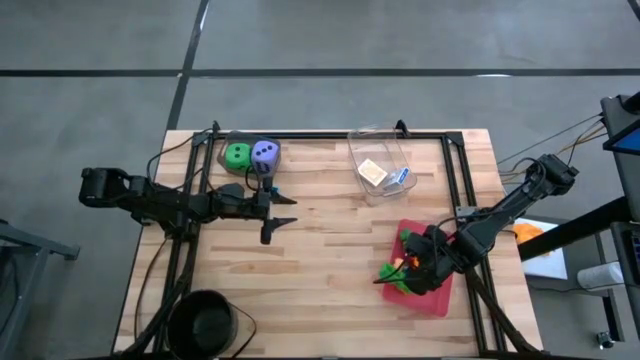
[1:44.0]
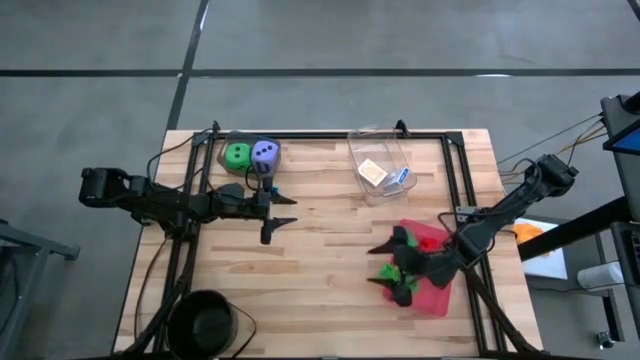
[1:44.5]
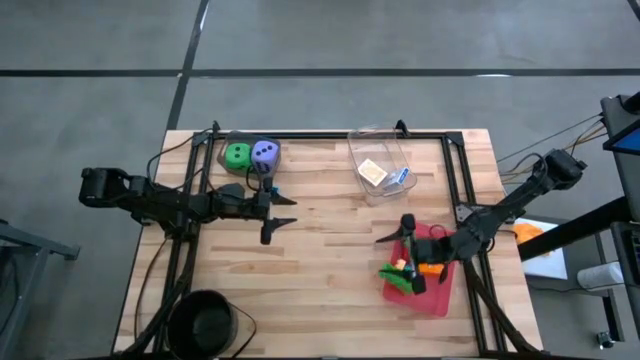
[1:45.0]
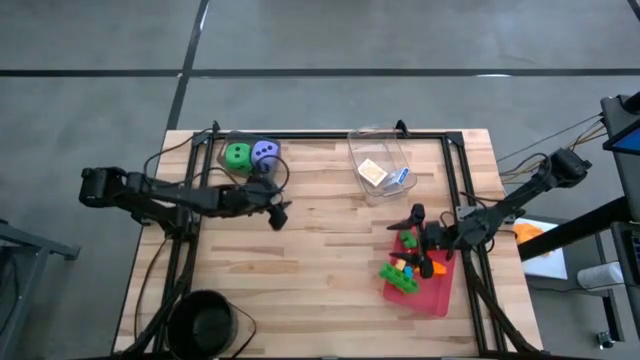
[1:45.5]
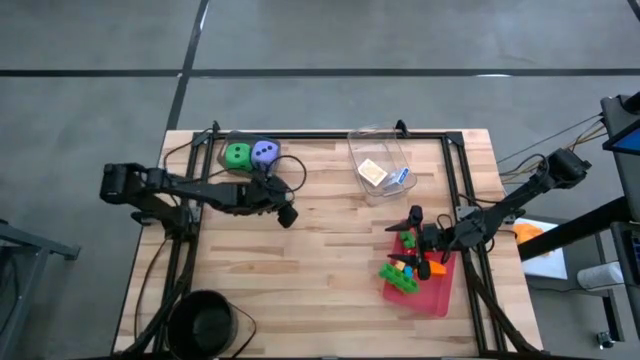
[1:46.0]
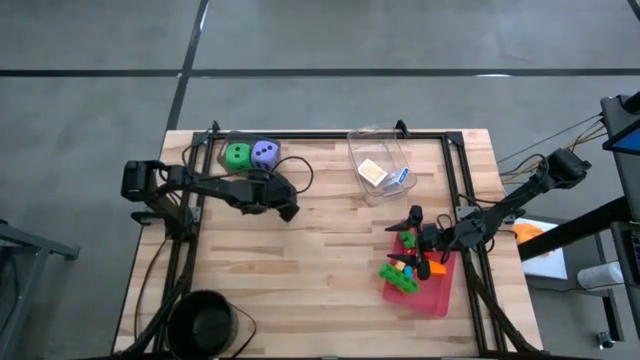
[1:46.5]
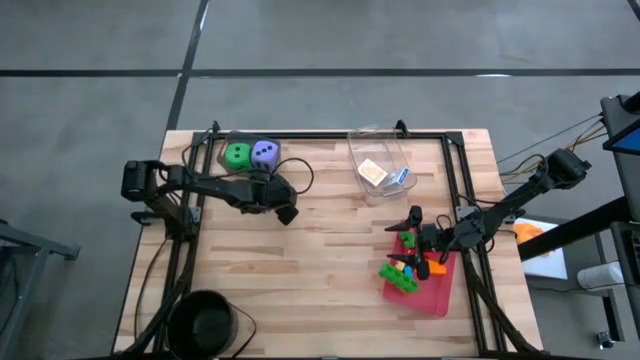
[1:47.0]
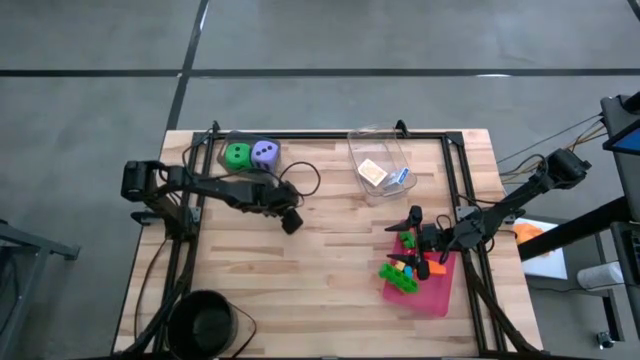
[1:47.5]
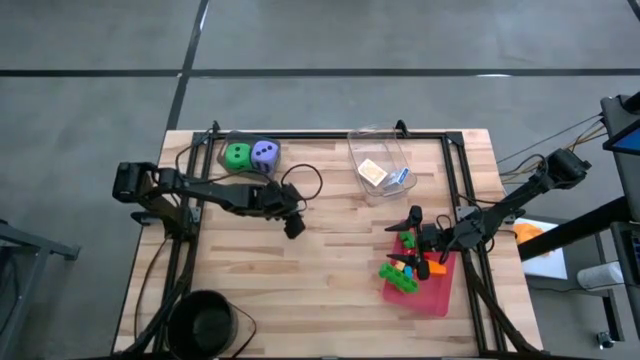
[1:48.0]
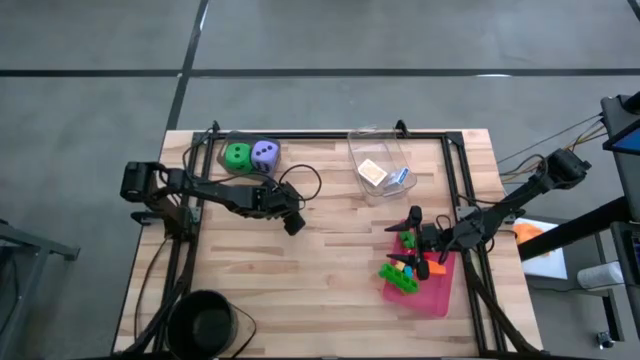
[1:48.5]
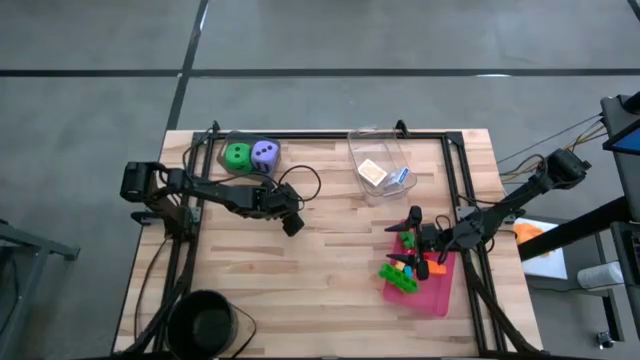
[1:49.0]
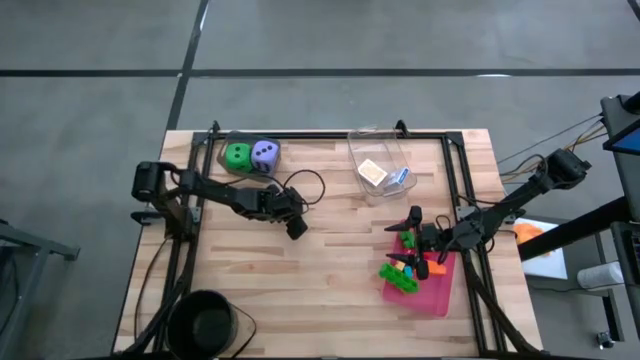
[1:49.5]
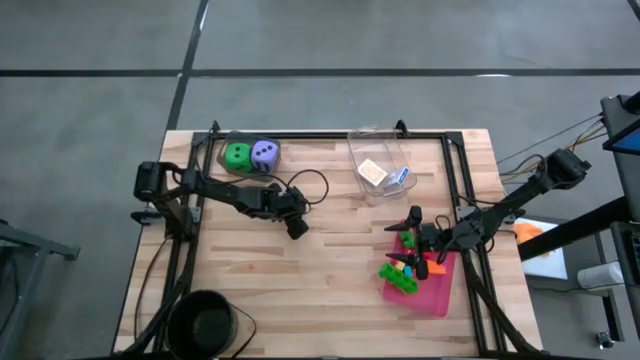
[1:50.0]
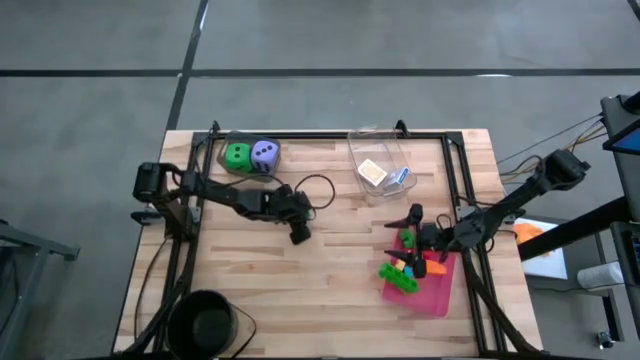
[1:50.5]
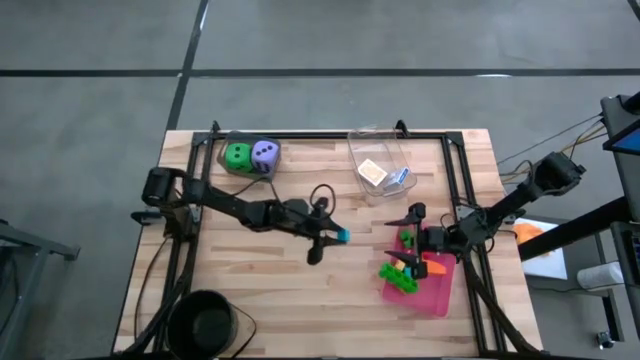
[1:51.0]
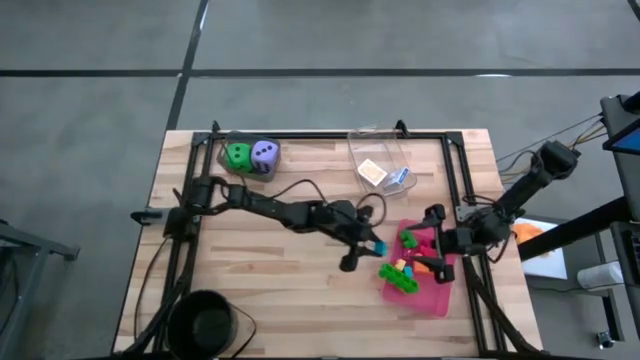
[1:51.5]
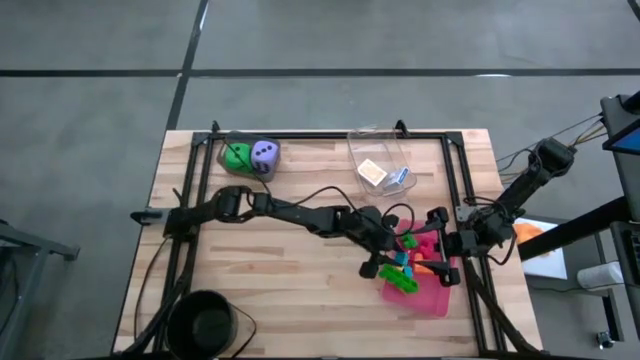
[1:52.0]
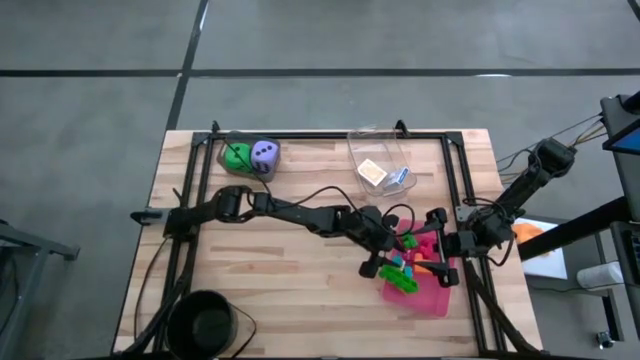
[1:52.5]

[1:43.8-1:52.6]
Task: Pick & Place Toys
Put the blue game piece into the pink bin

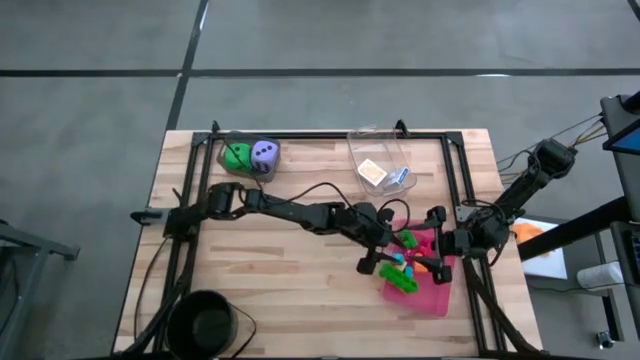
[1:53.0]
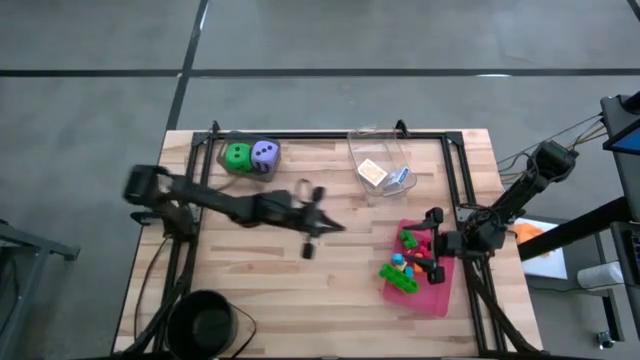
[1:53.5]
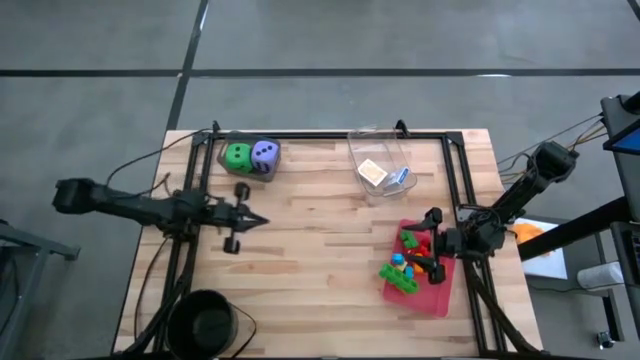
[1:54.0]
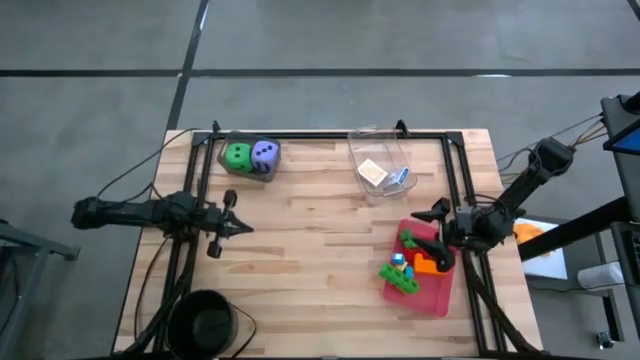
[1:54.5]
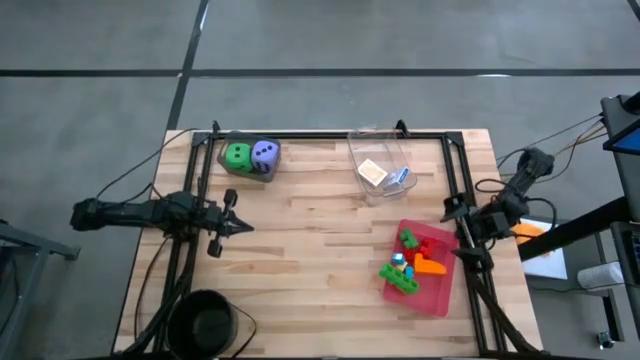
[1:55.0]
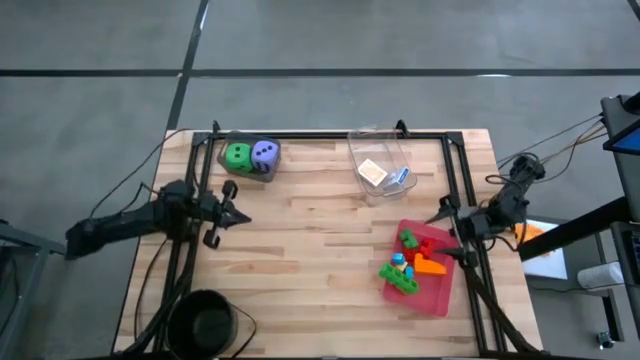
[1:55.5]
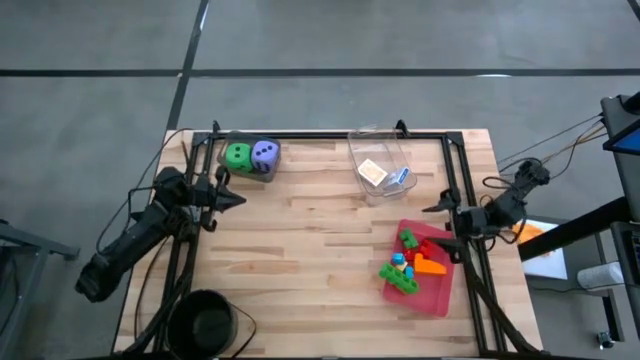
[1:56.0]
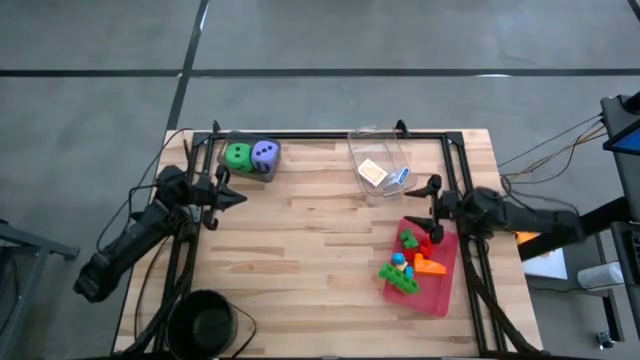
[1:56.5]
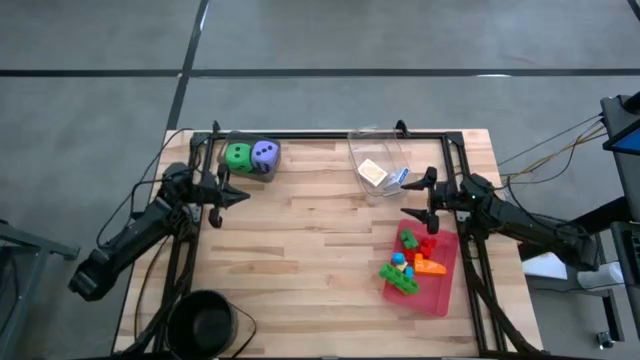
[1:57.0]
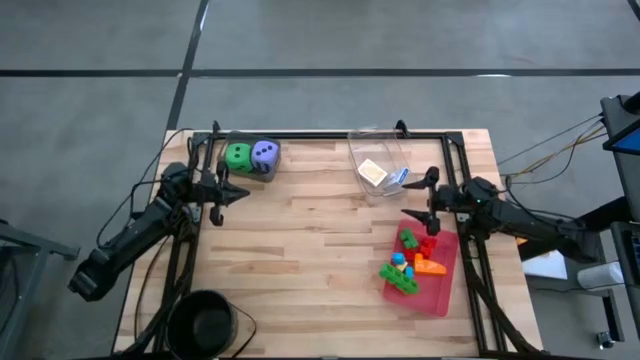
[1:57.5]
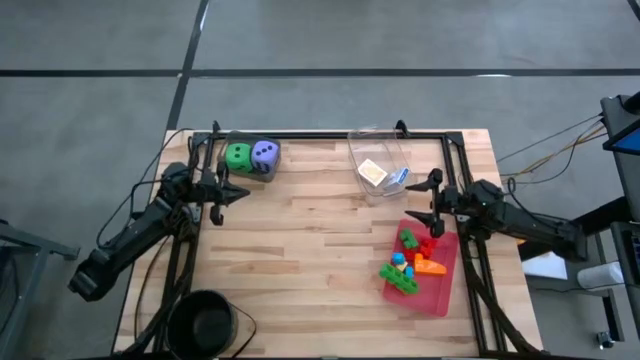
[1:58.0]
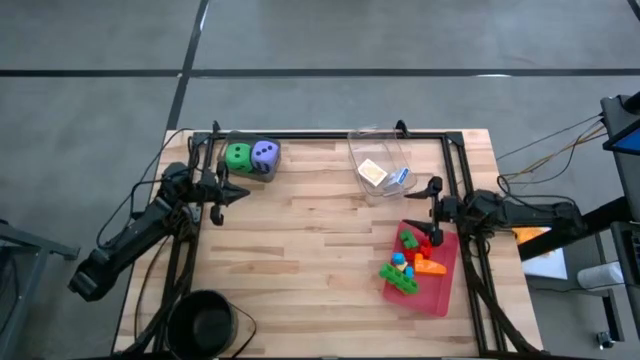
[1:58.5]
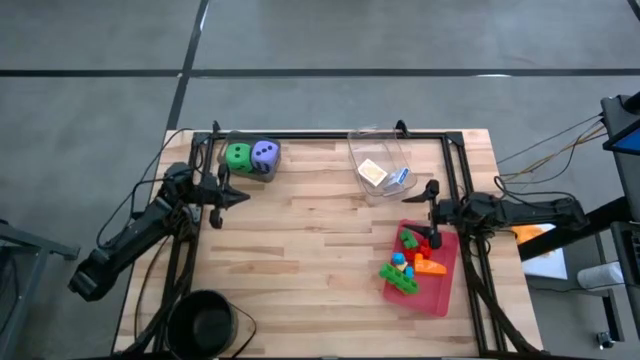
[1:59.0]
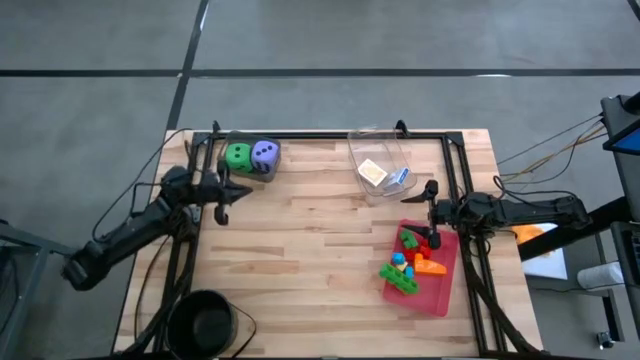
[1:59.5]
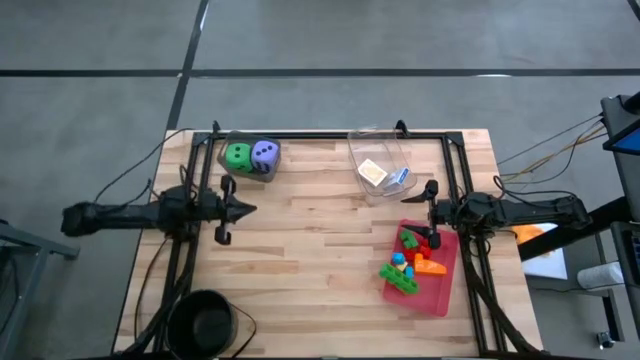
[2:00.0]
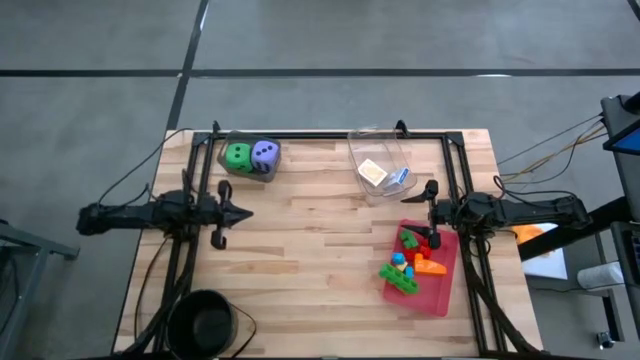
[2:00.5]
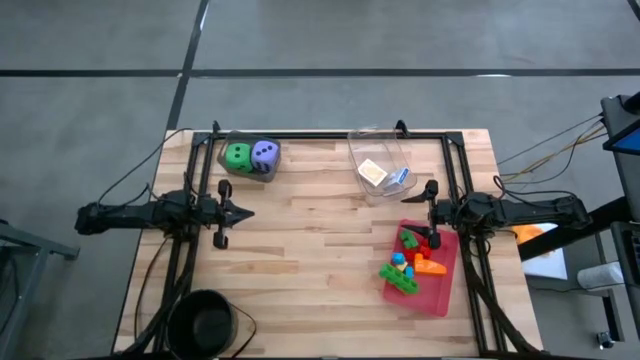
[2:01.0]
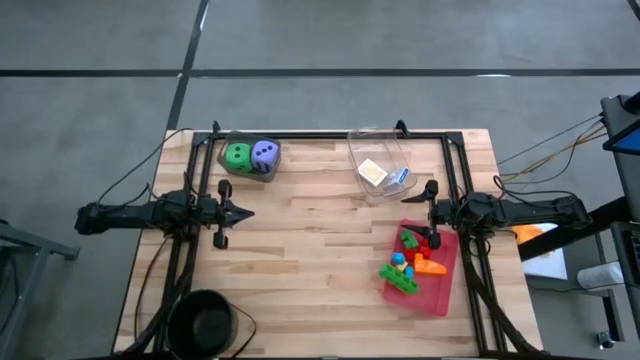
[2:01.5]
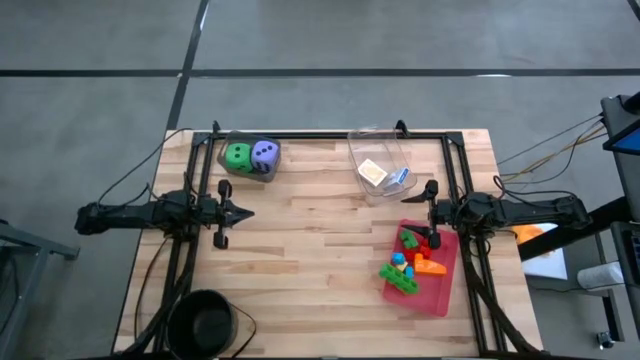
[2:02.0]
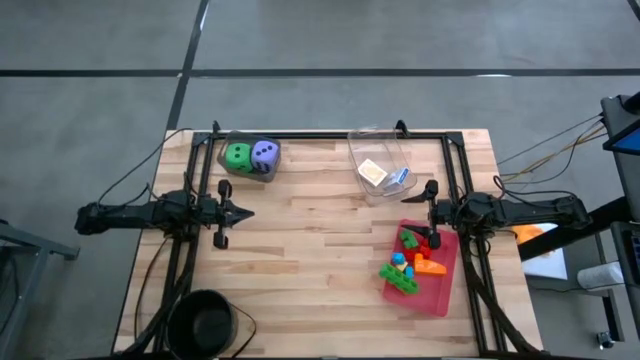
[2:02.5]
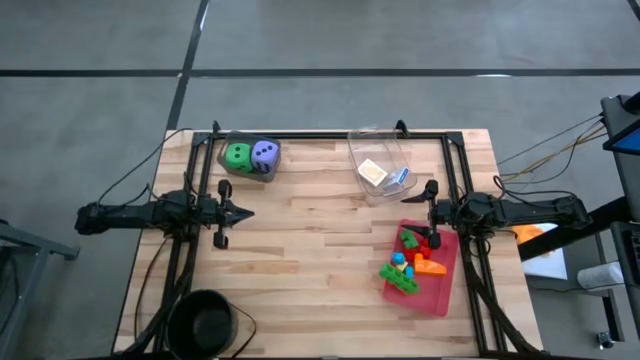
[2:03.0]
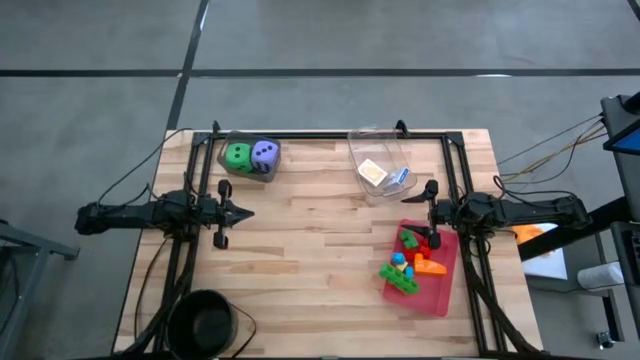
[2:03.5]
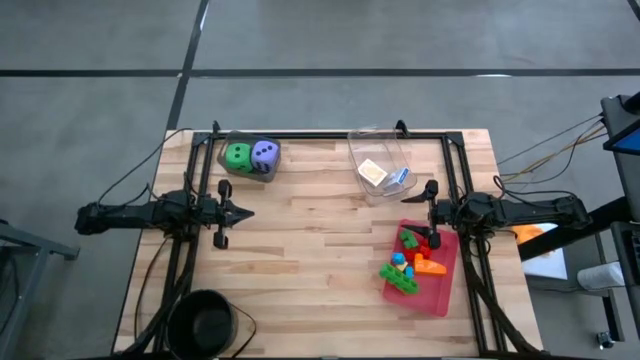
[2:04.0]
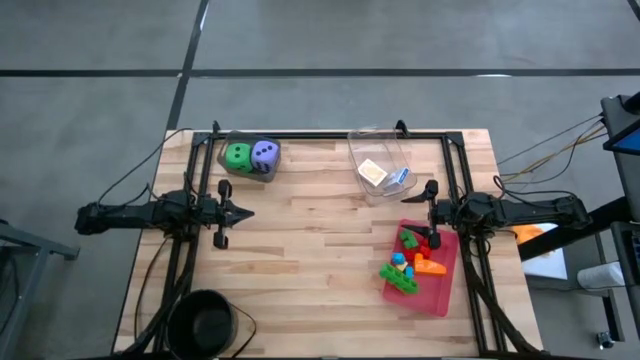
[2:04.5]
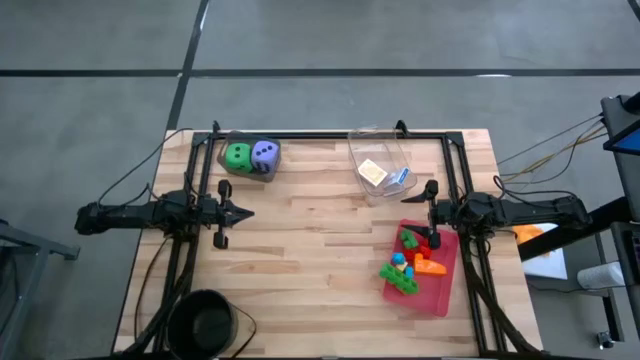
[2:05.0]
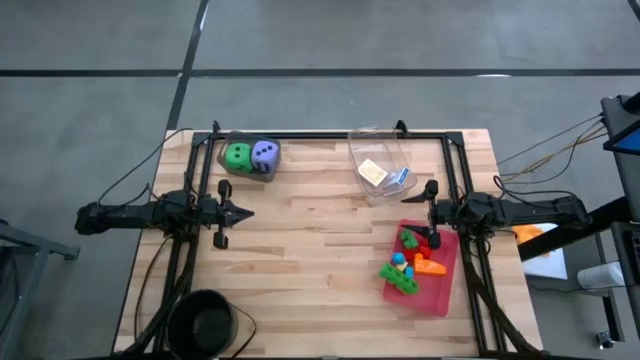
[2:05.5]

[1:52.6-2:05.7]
Return to Home Position
